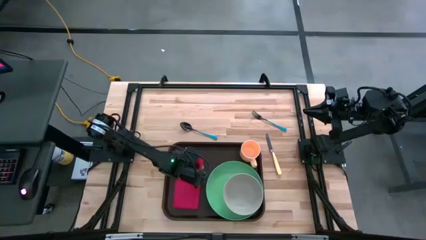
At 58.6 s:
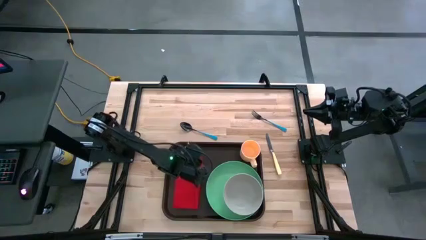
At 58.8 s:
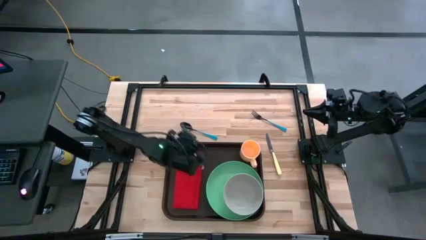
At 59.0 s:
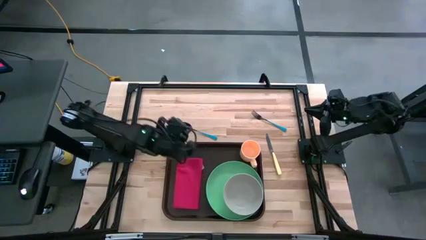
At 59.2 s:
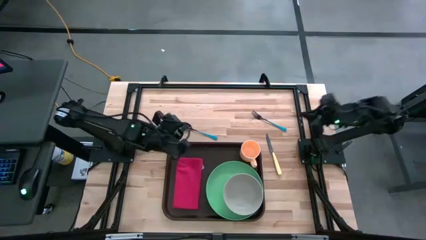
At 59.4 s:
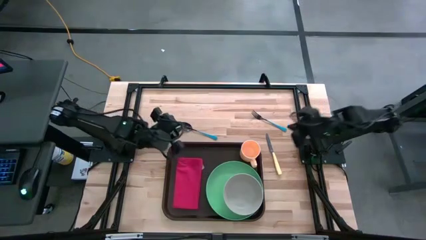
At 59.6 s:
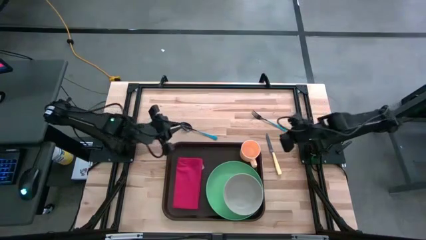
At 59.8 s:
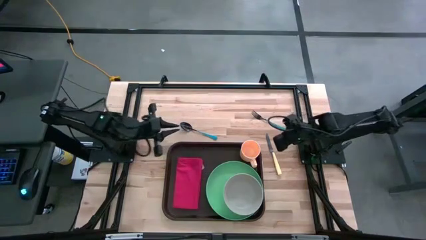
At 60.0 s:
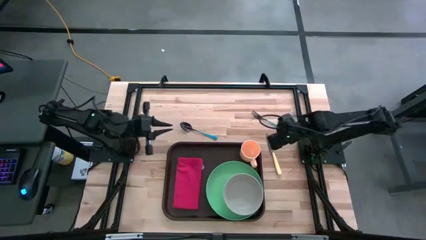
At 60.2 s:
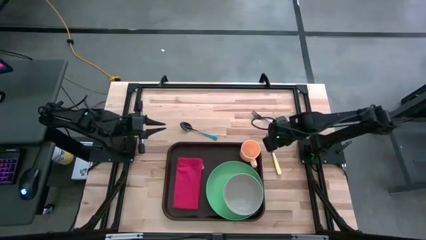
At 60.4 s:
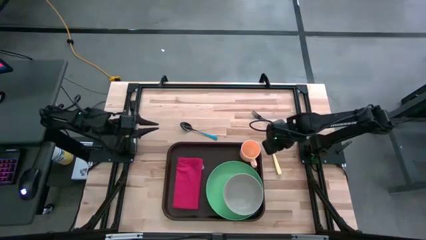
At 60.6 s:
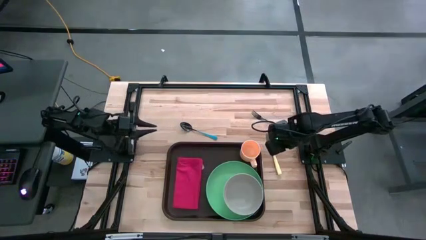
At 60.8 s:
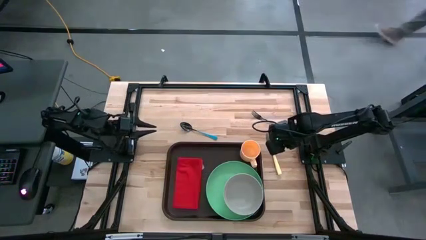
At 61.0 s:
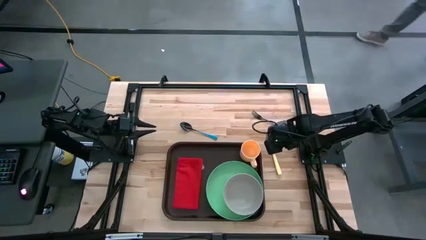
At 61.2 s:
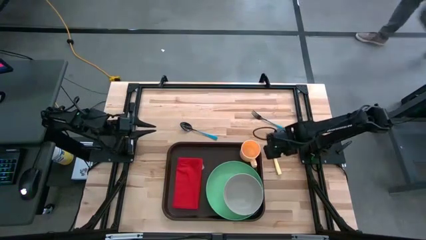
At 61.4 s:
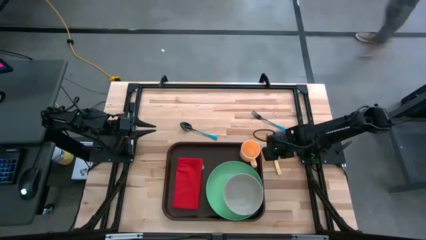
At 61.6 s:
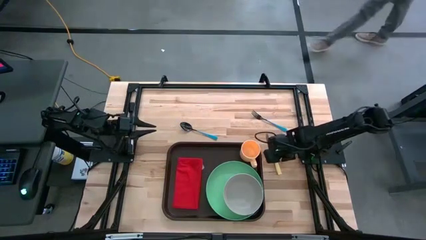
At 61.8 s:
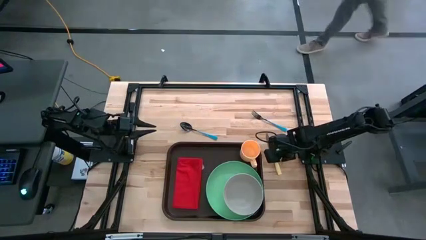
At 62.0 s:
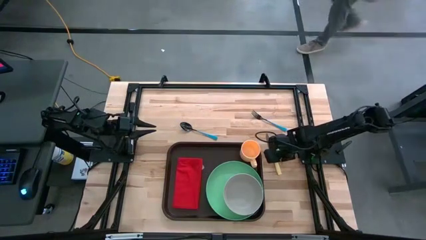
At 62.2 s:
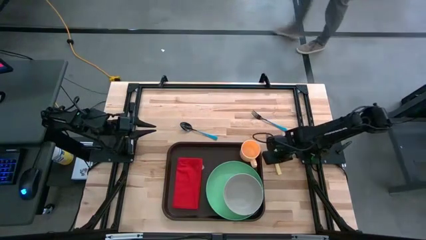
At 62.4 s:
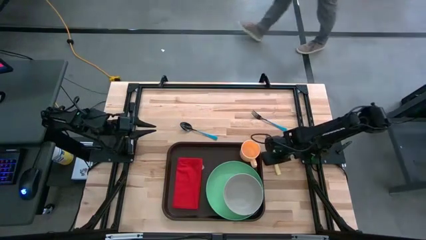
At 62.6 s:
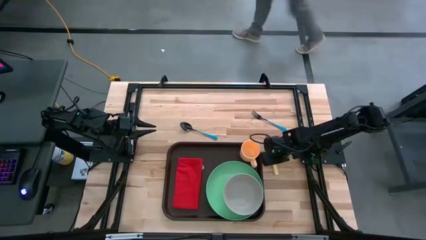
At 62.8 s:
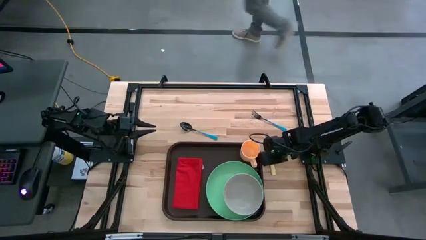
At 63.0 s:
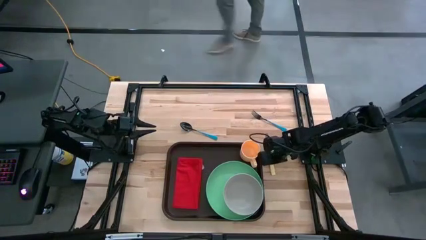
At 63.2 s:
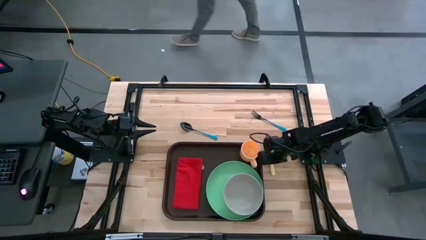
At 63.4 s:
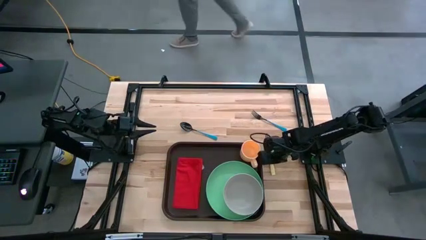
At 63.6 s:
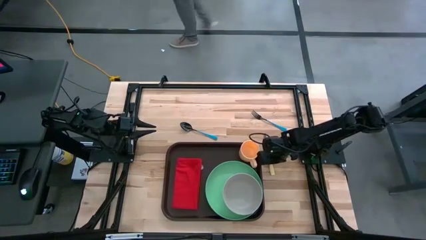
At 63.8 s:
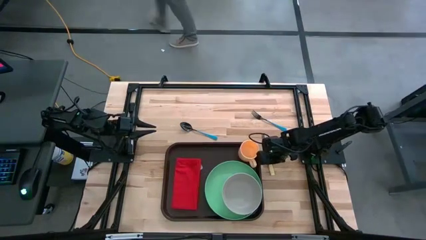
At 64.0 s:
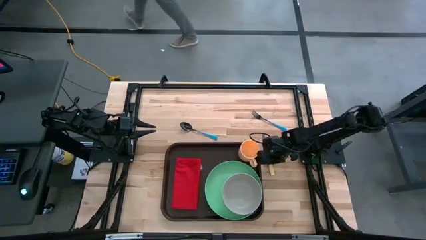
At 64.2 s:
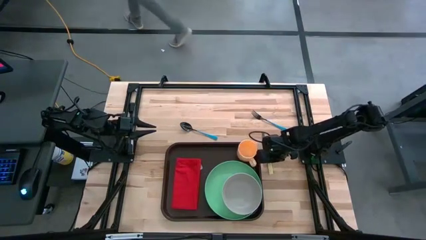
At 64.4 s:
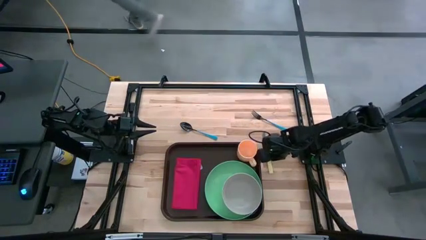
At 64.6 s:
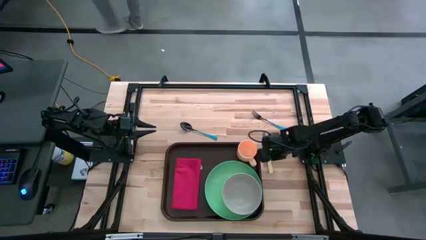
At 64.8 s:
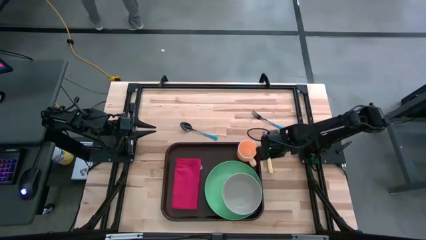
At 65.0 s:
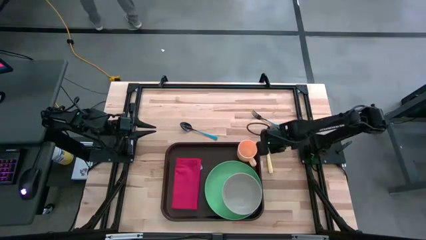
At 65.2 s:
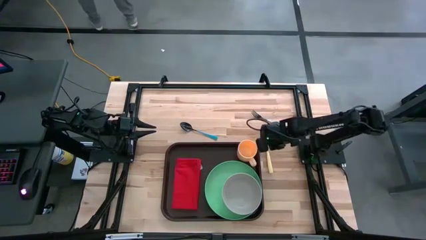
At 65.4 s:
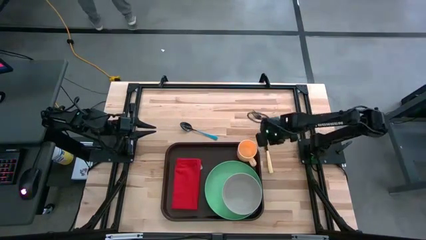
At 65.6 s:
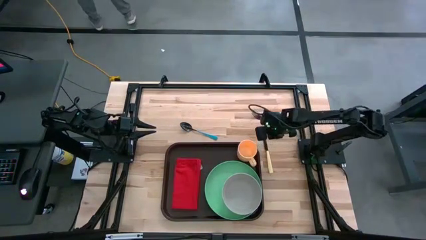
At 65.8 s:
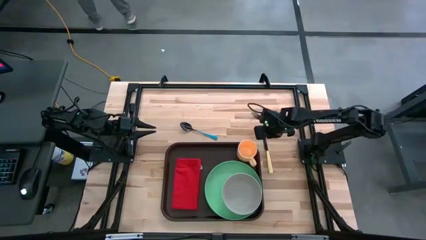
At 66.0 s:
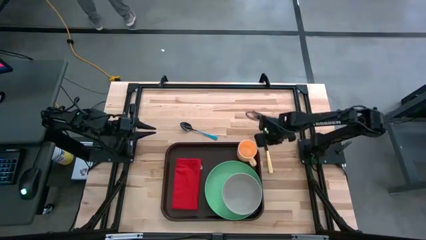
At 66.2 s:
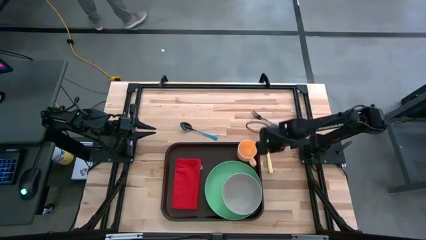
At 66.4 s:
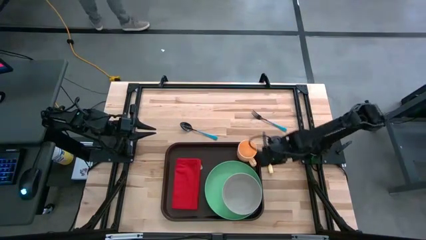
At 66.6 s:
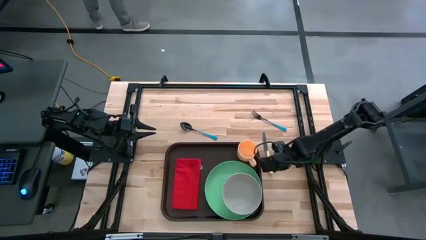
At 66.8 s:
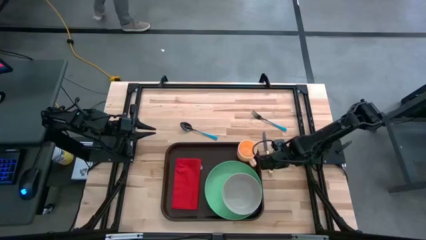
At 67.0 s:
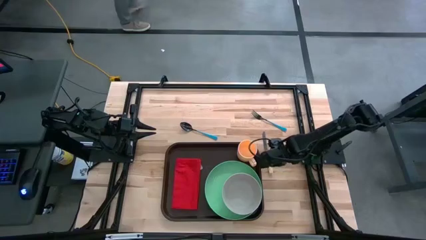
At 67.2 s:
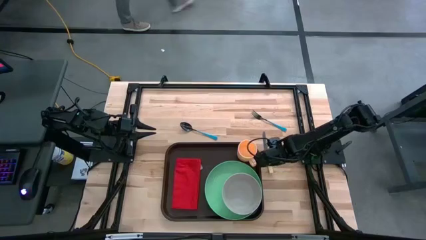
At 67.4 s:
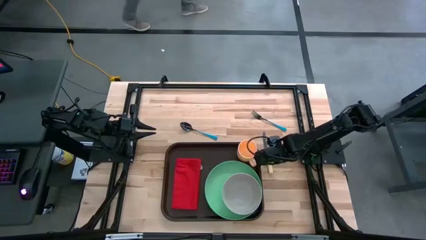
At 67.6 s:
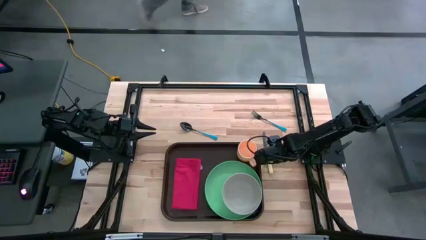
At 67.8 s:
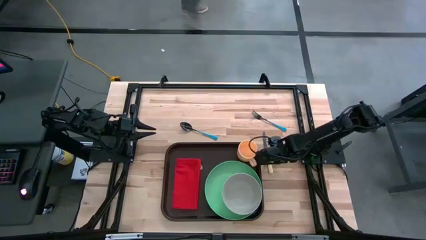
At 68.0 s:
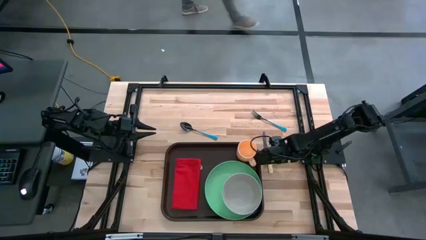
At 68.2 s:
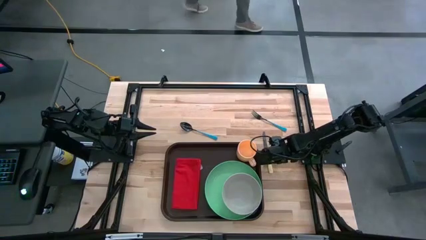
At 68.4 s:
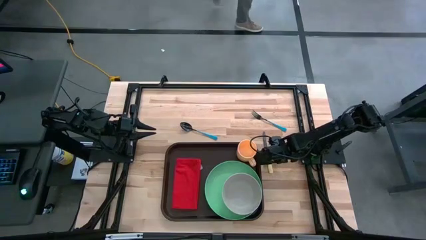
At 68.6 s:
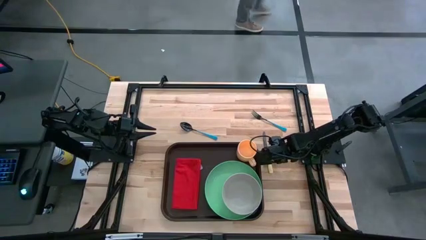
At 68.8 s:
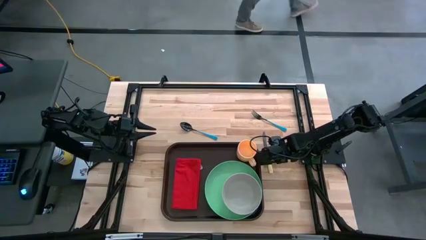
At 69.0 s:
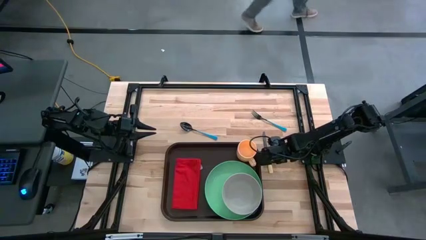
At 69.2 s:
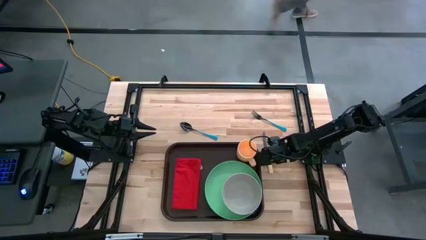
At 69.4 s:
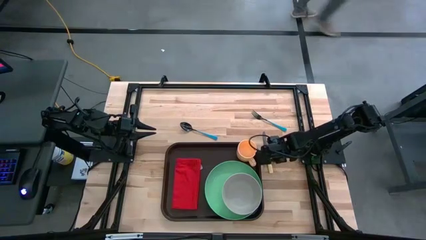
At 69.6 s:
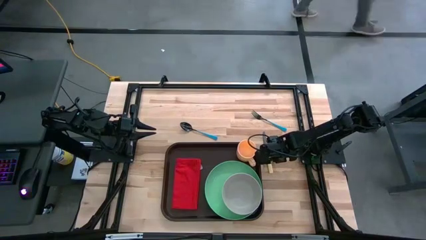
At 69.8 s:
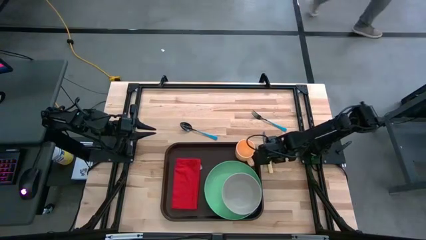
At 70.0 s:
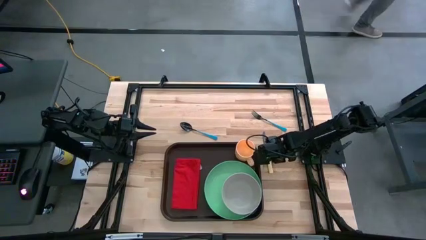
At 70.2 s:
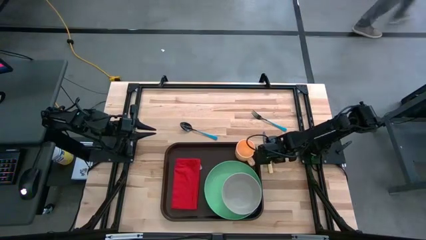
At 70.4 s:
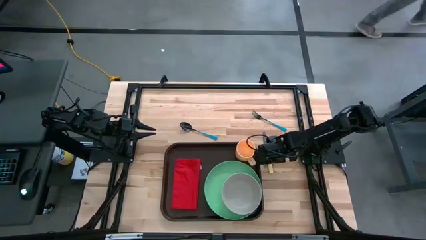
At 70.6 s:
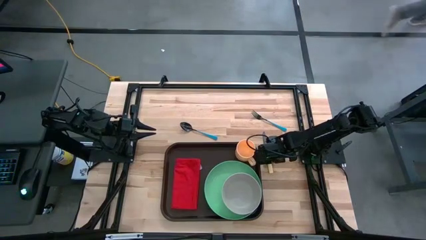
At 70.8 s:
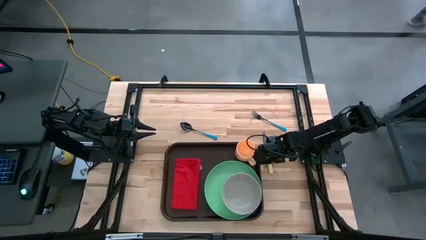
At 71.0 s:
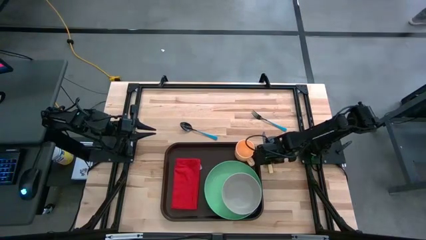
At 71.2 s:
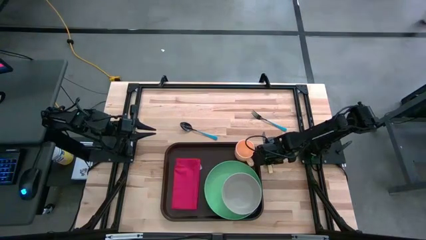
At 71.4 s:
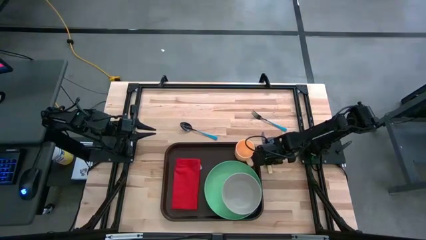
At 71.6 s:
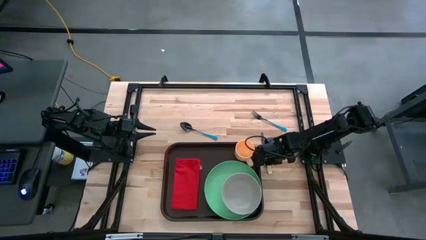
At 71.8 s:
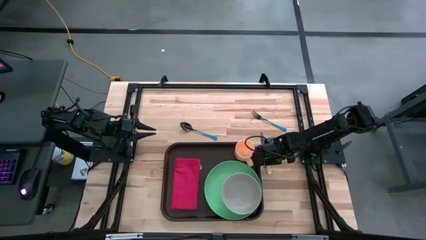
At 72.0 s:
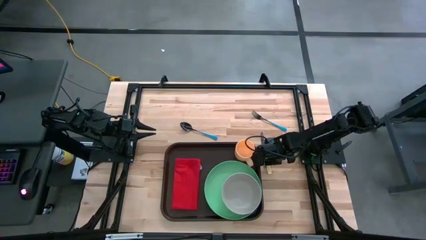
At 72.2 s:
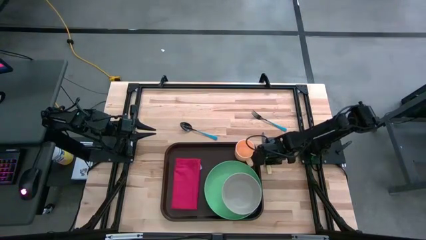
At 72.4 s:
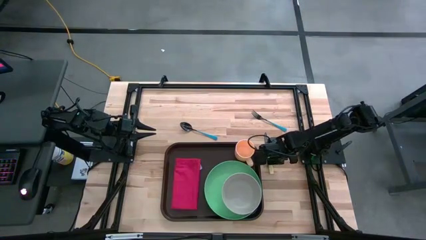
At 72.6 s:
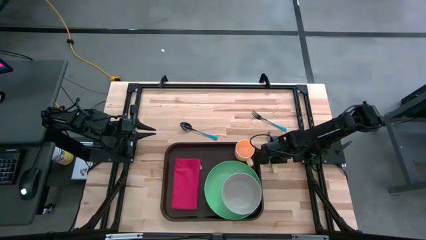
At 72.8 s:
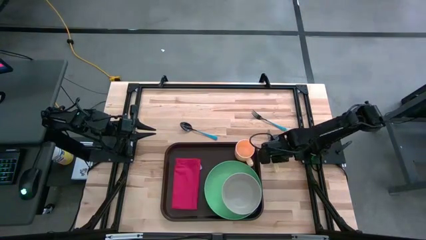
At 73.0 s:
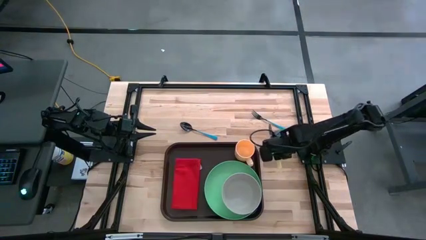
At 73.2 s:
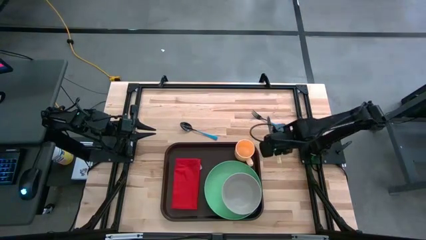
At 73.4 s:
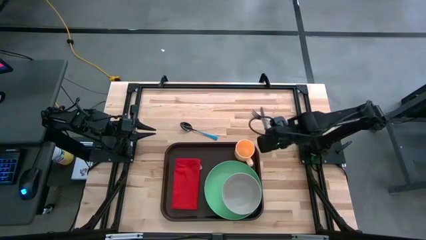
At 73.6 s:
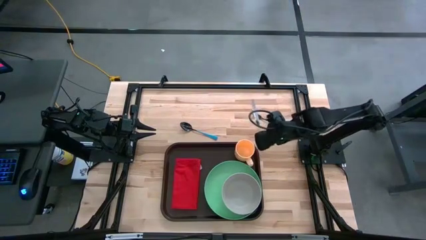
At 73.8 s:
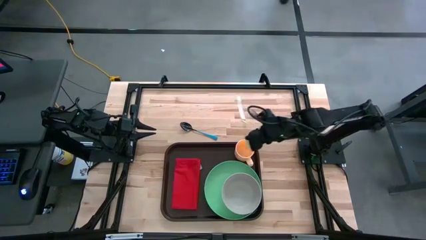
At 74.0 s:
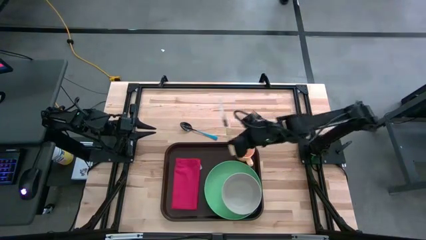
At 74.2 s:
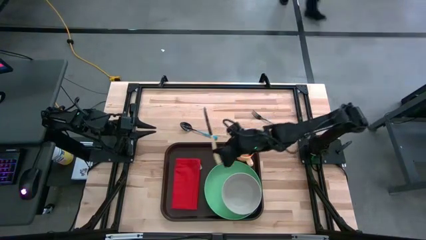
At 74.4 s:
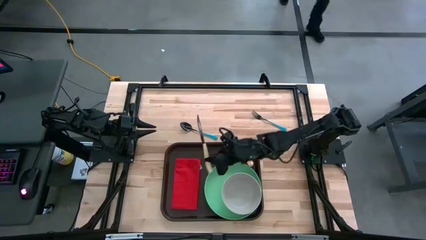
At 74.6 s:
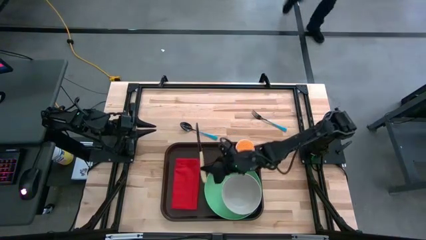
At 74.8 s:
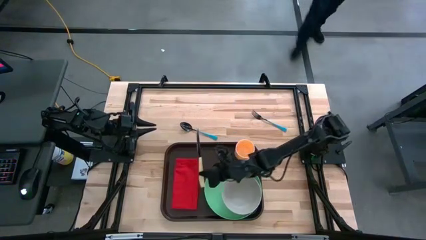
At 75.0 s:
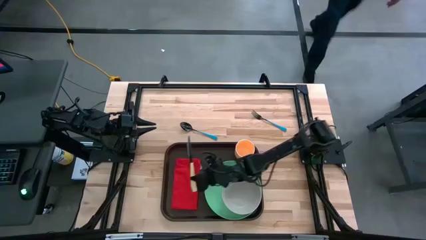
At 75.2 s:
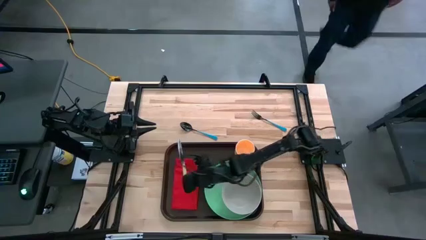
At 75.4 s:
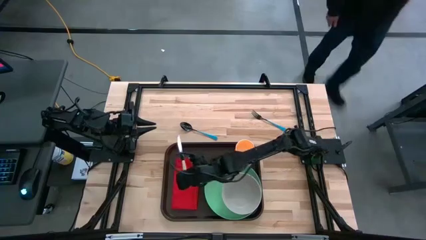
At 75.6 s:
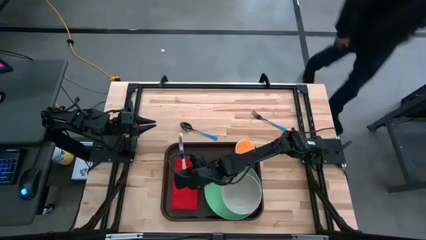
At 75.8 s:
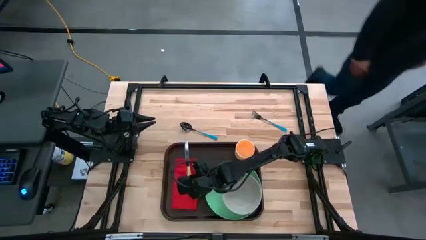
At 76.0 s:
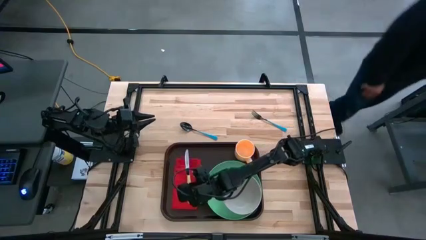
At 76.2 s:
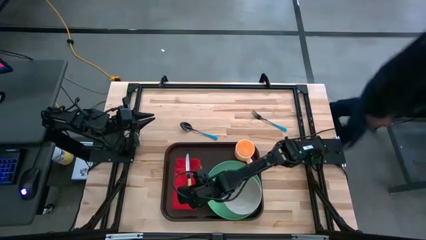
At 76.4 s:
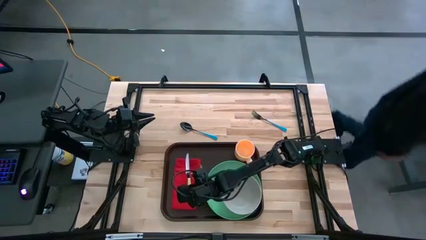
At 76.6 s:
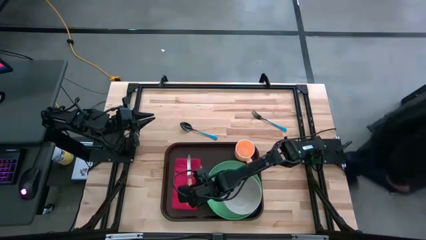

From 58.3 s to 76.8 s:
Task: Set up tray
Put the yellow knife to the left of the green plate on the red napkin on the brown serving tray
